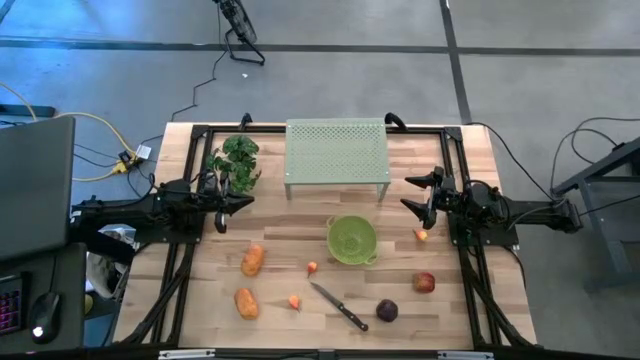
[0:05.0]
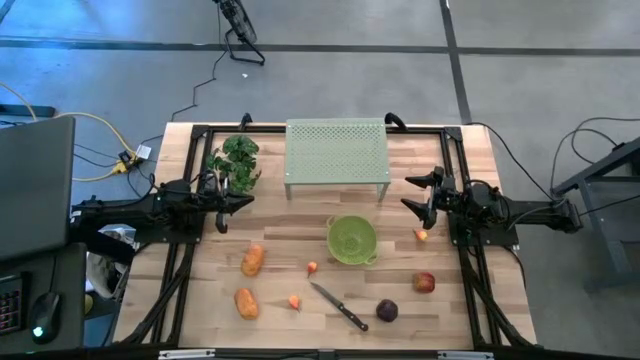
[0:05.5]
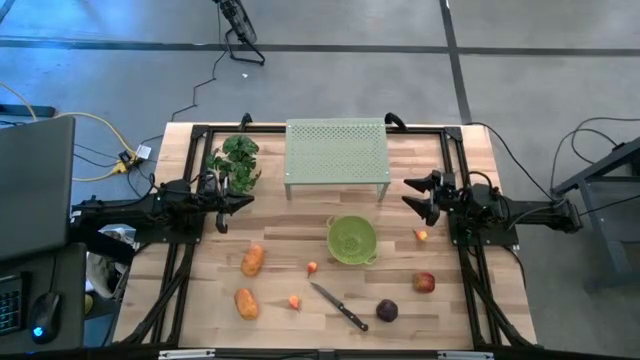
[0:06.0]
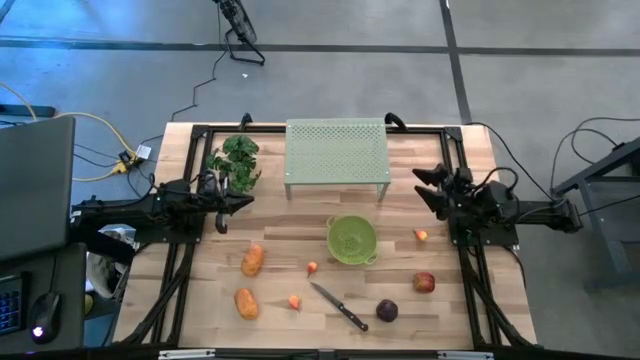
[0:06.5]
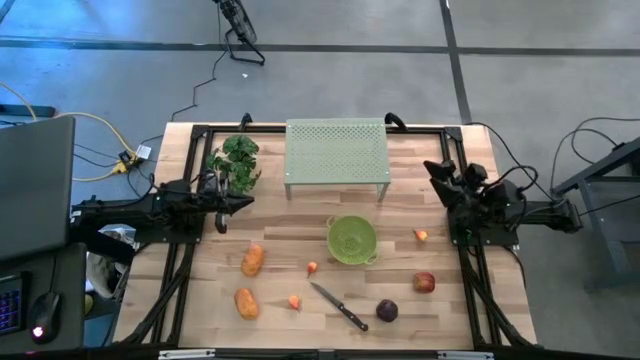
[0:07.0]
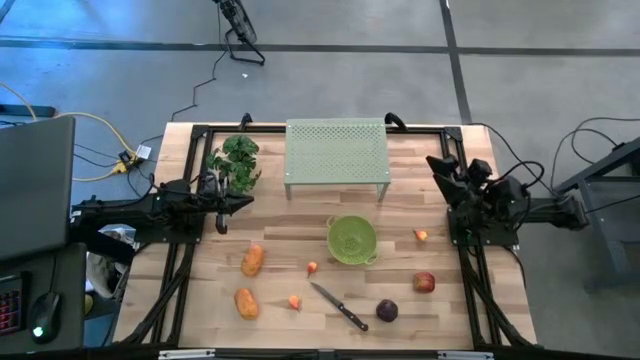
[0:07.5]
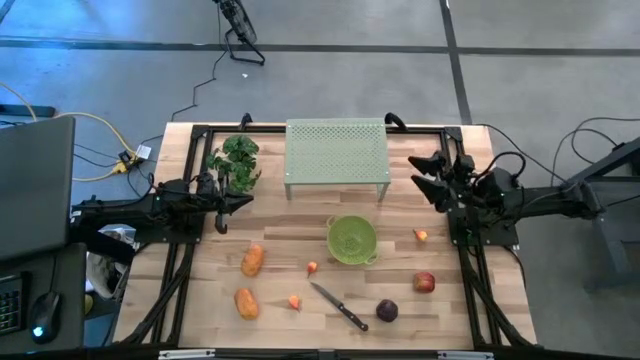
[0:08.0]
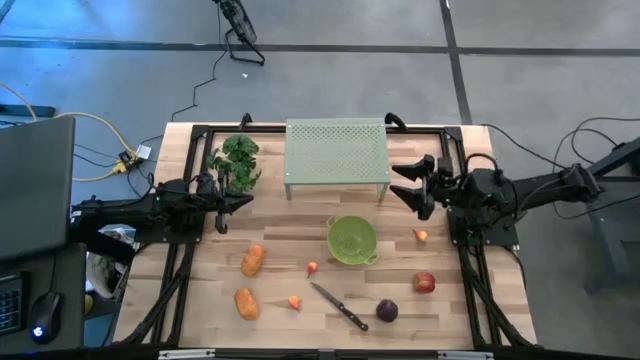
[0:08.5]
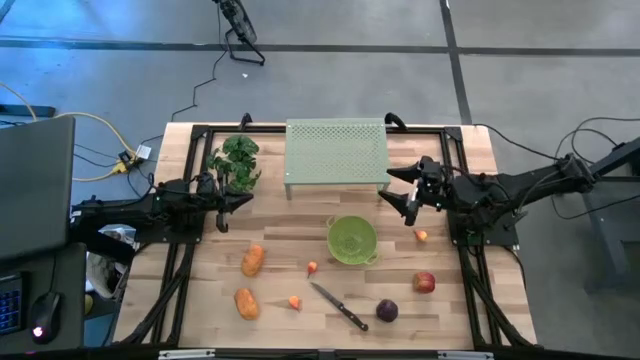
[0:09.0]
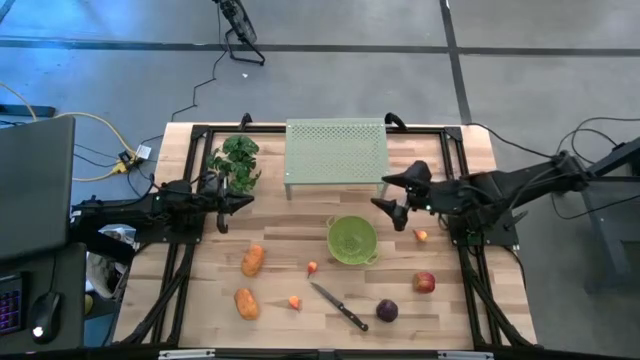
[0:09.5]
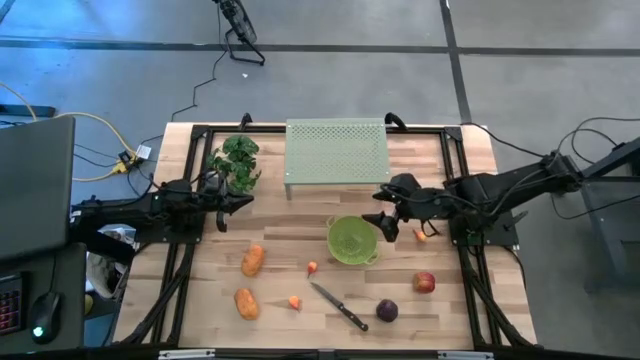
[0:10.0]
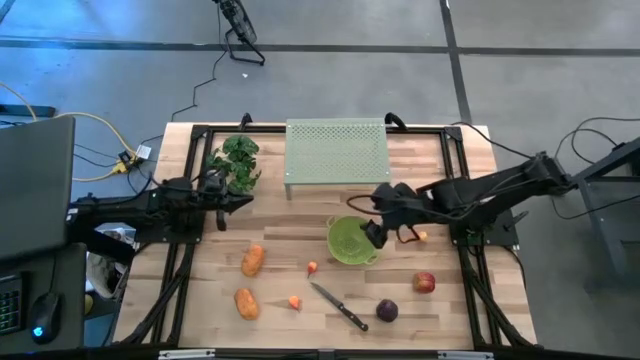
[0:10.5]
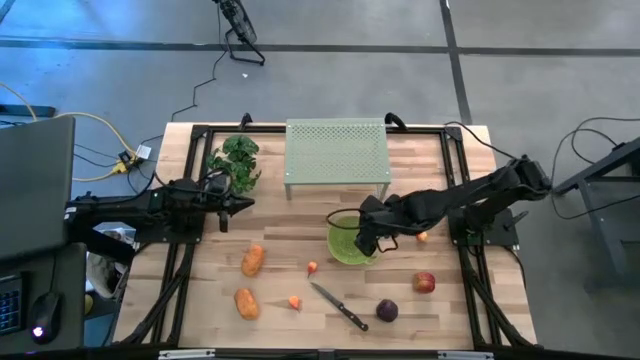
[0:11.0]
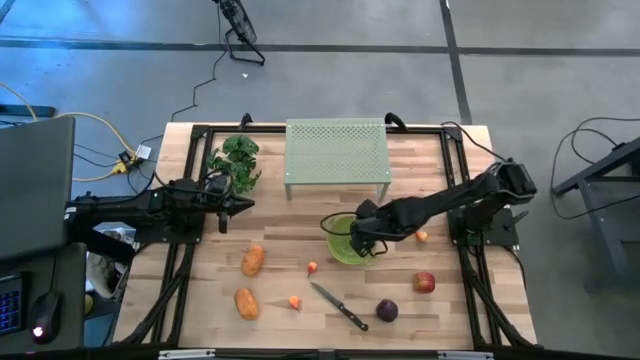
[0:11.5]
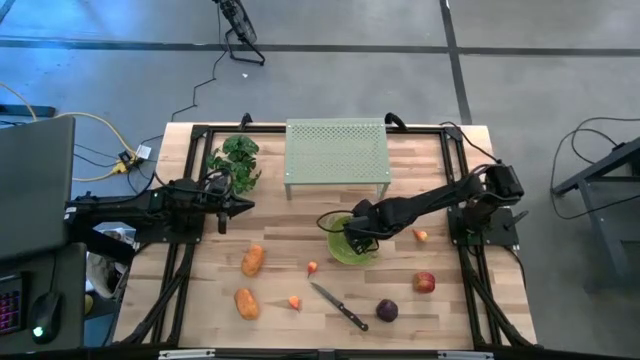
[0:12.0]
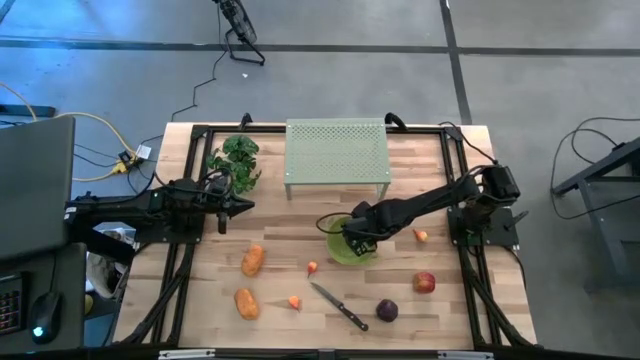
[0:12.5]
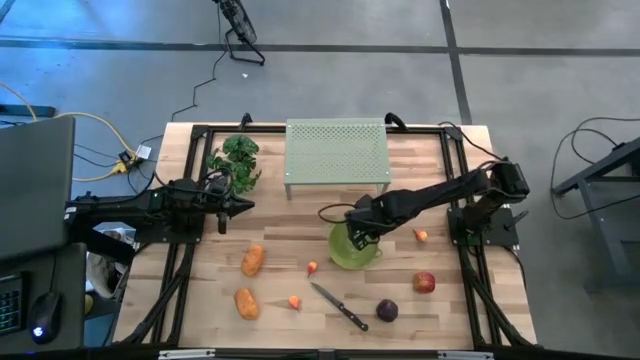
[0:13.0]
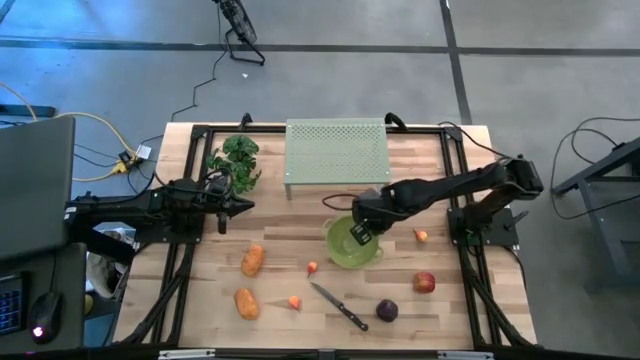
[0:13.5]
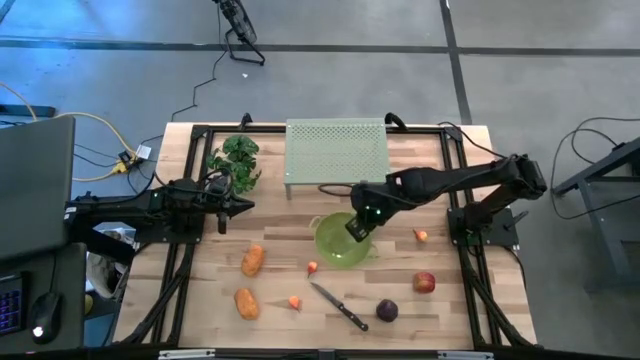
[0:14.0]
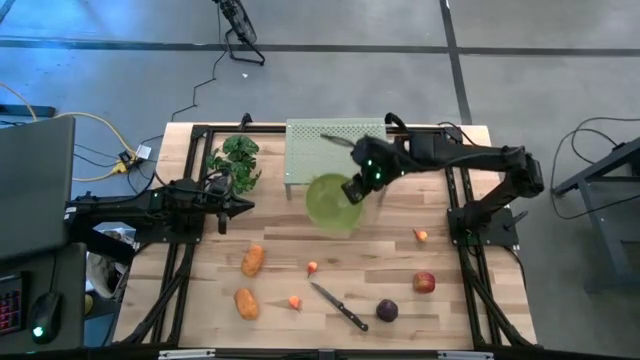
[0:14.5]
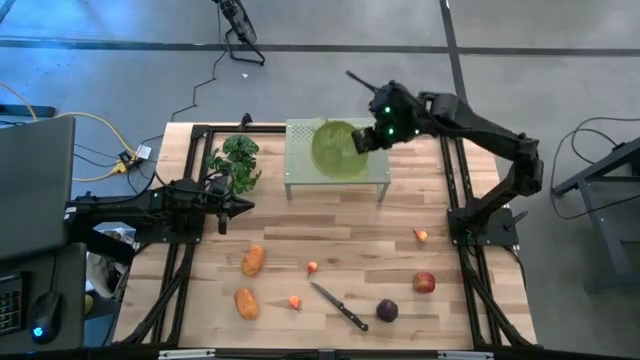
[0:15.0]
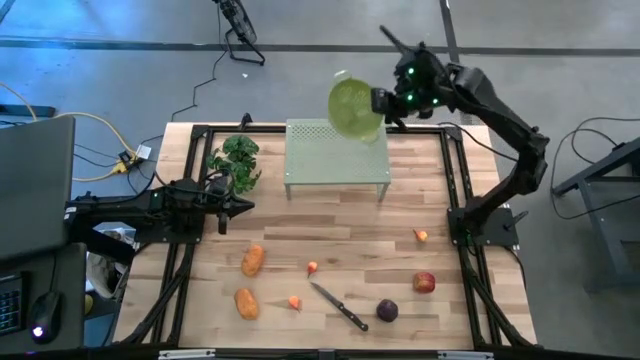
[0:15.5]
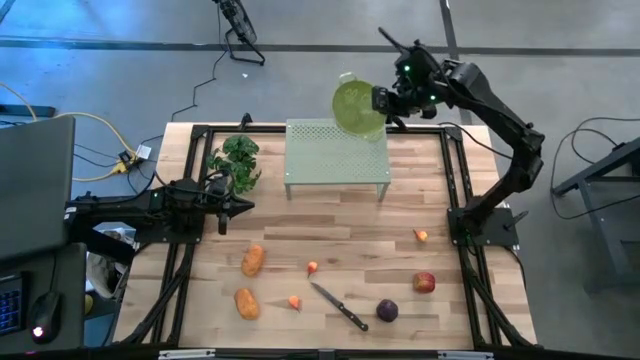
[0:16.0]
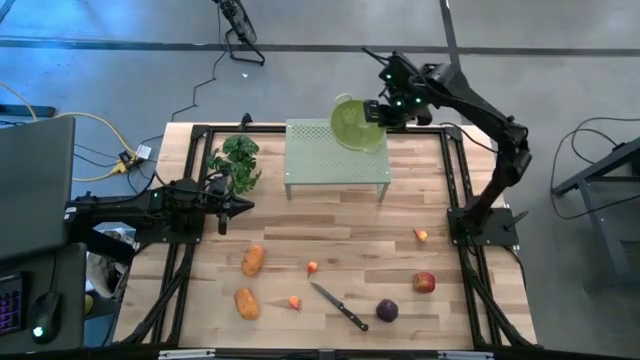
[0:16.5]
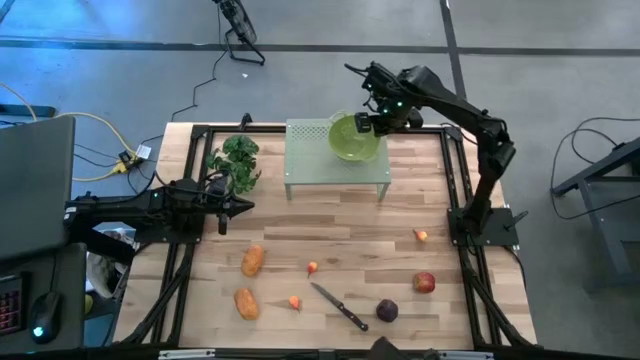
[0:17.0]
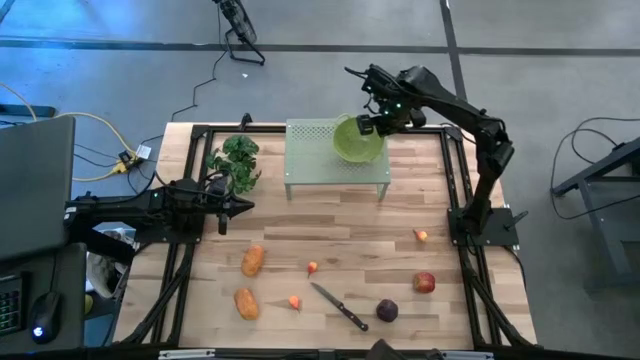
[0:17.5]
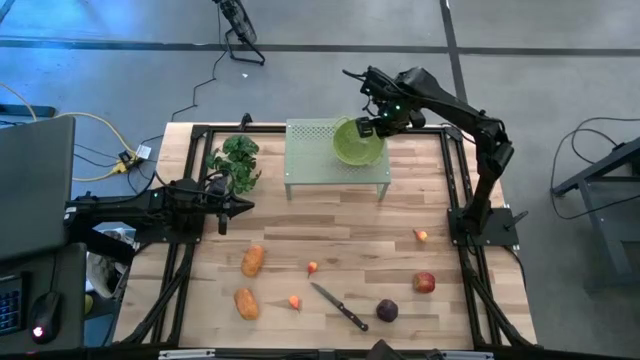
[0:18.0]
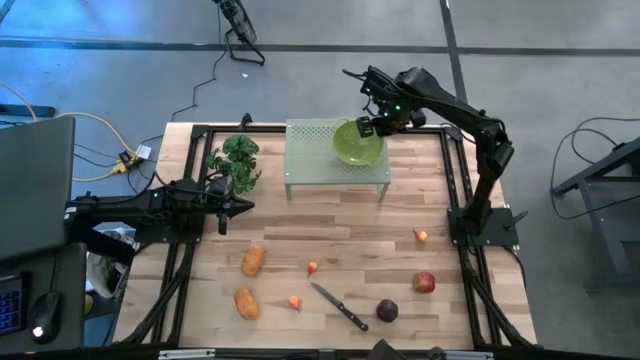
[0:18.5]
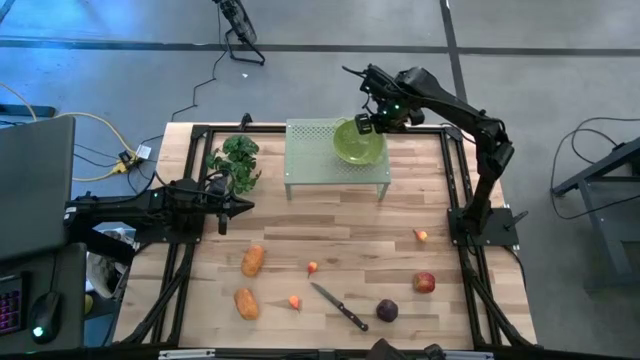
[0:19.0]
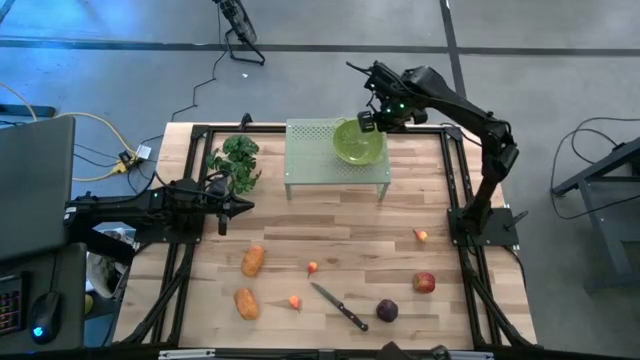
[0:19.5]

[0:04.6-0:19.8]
Task: Pick & Place Fruit
Put the green strainer bowl on the top shelf
